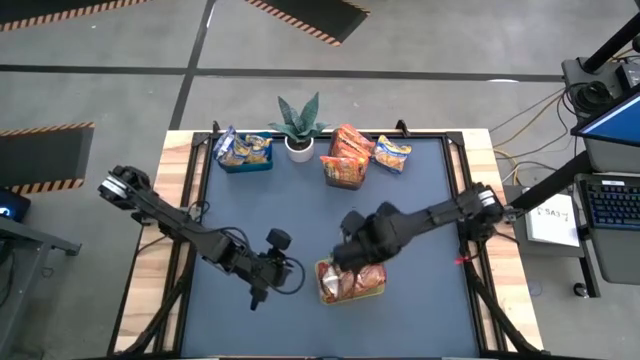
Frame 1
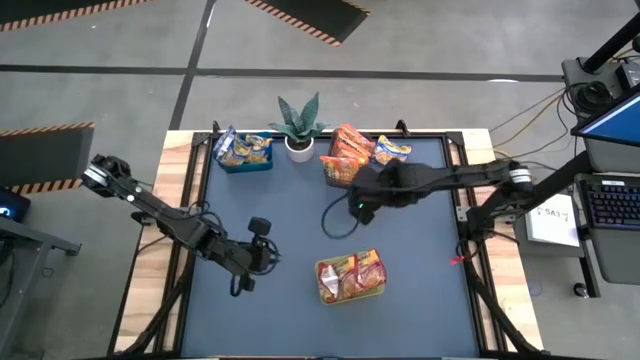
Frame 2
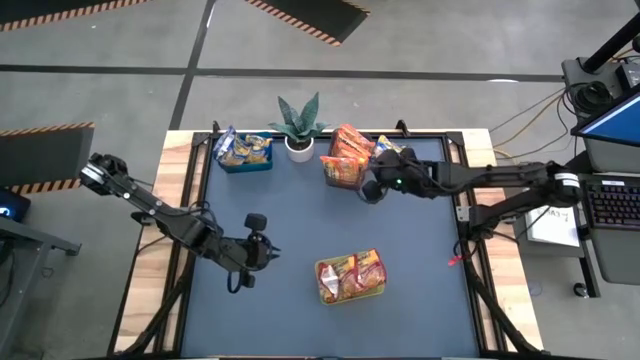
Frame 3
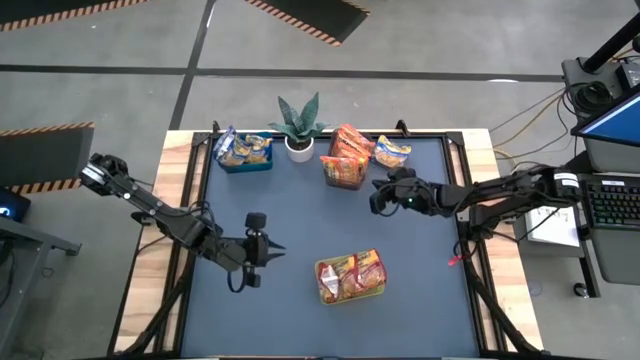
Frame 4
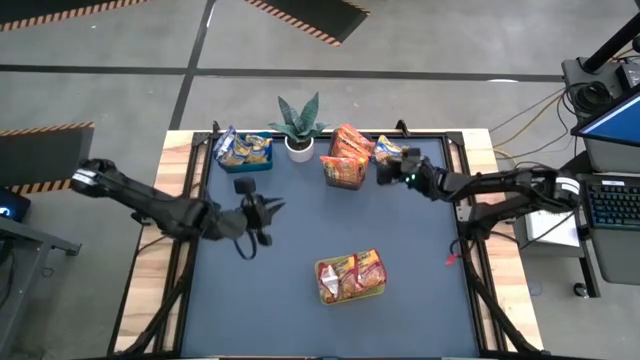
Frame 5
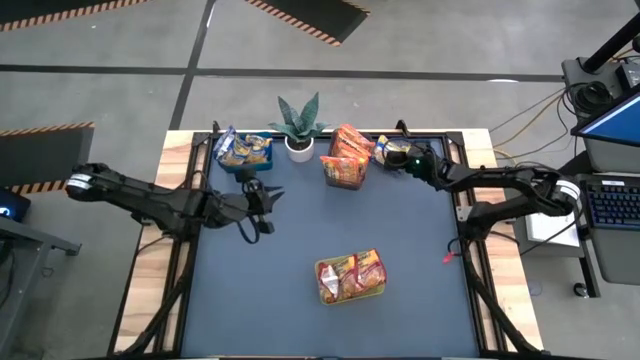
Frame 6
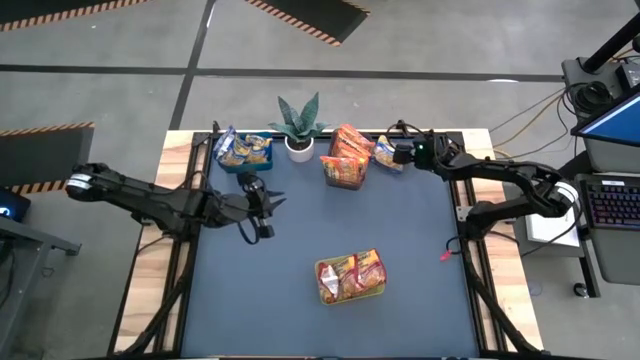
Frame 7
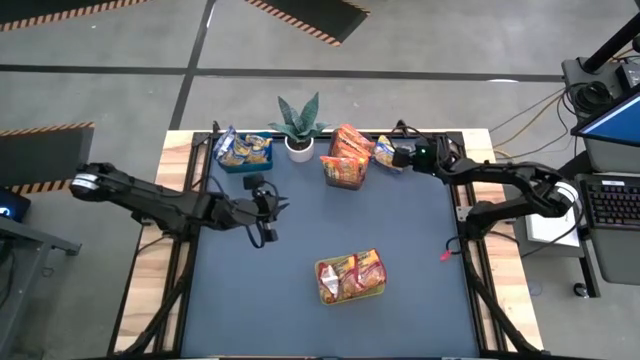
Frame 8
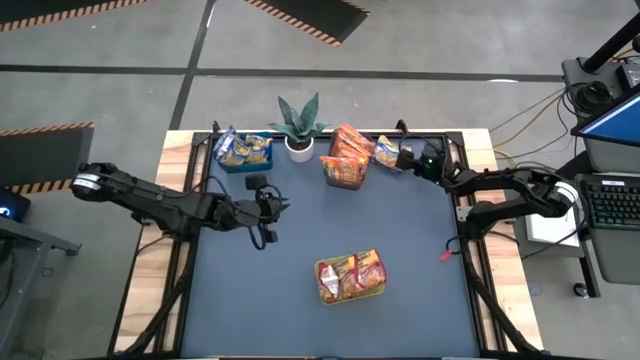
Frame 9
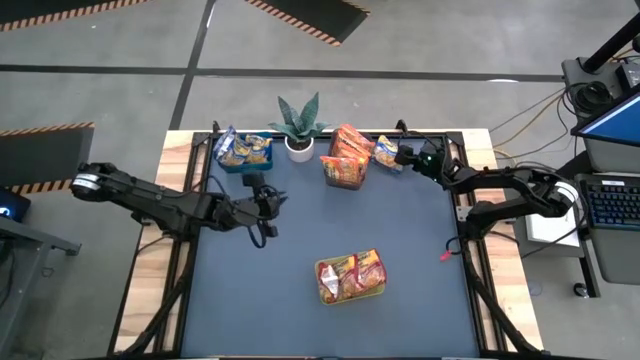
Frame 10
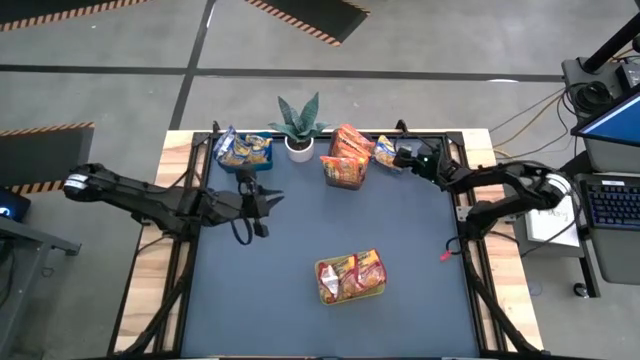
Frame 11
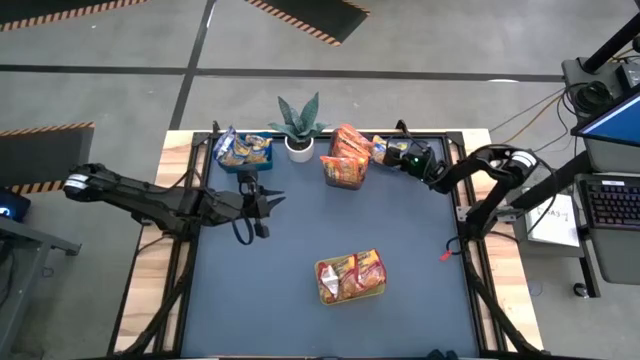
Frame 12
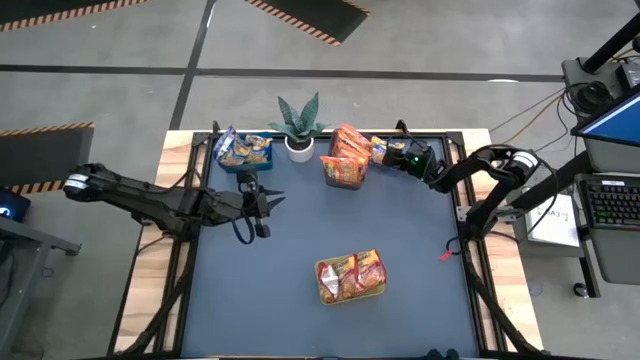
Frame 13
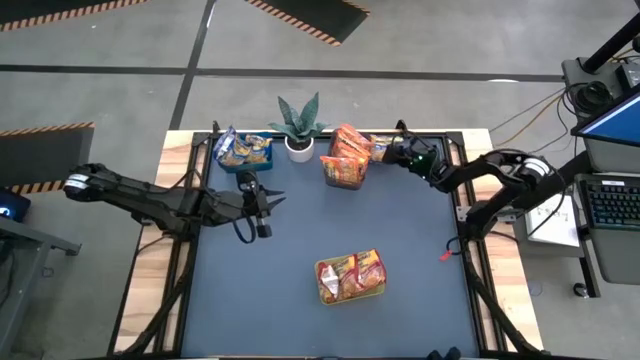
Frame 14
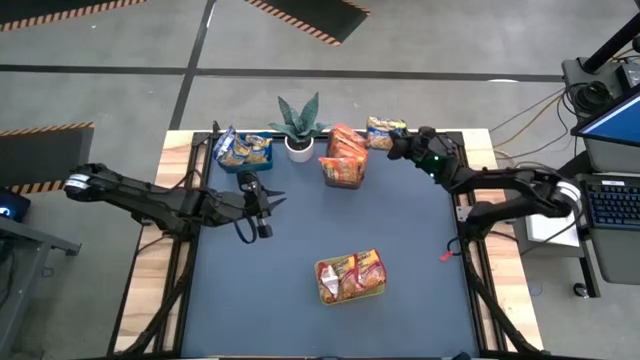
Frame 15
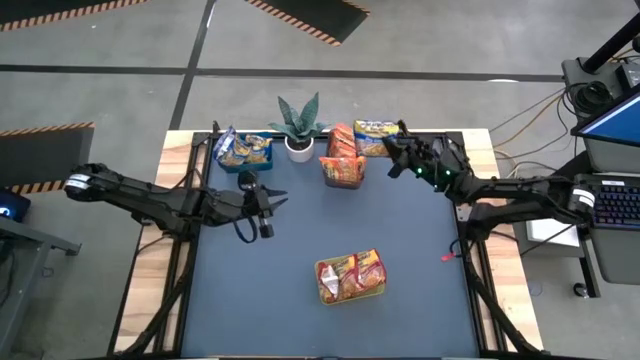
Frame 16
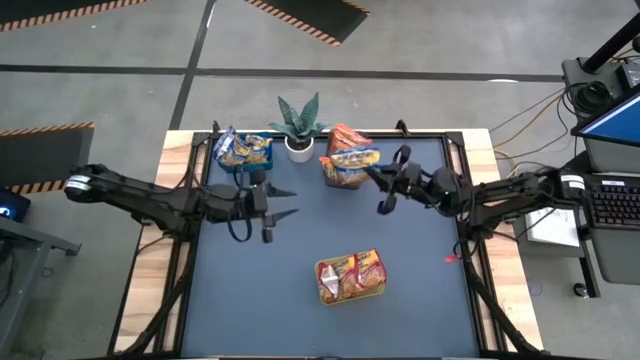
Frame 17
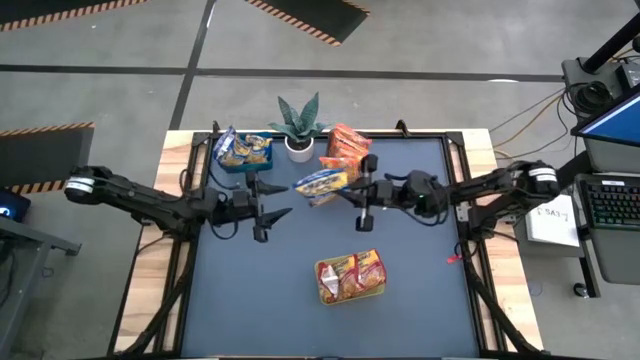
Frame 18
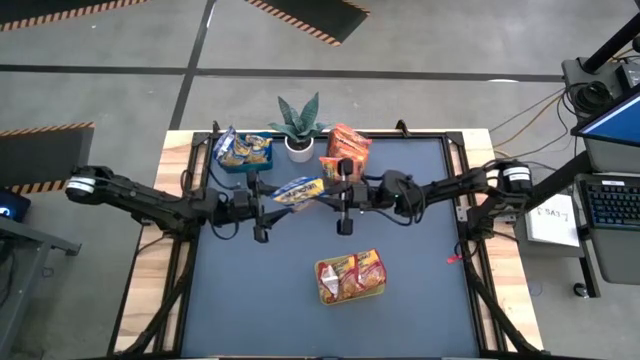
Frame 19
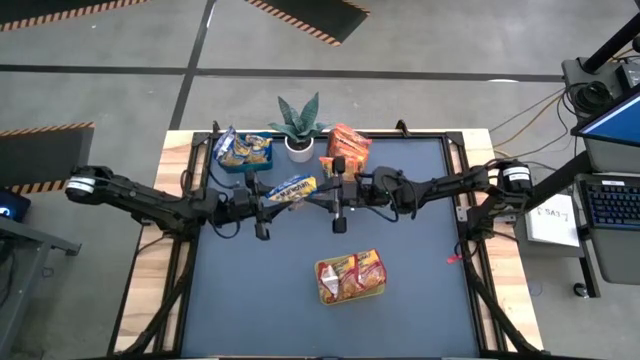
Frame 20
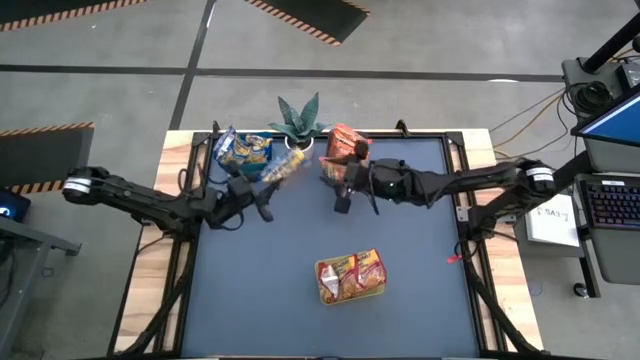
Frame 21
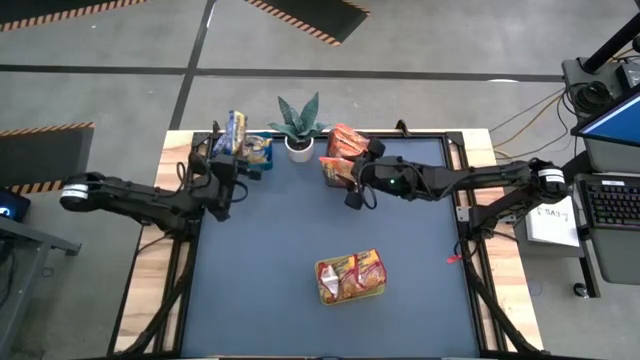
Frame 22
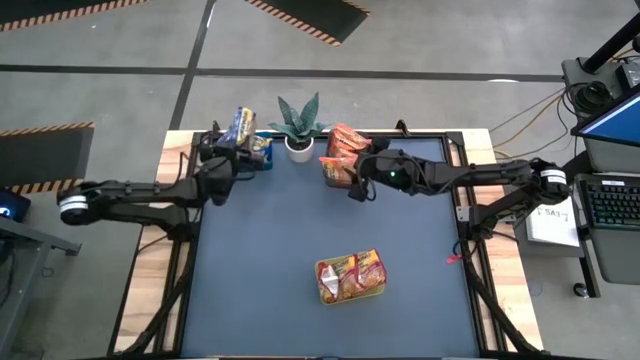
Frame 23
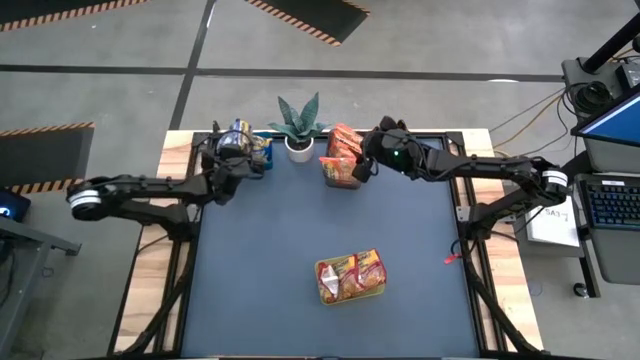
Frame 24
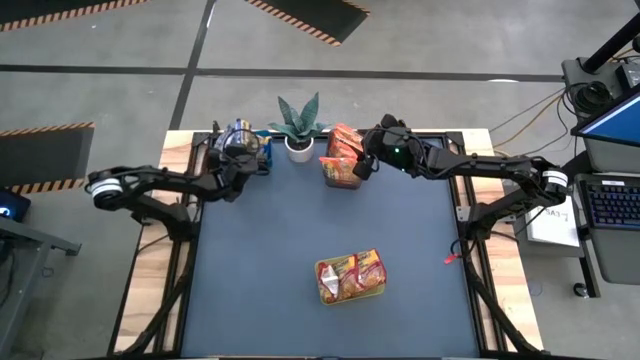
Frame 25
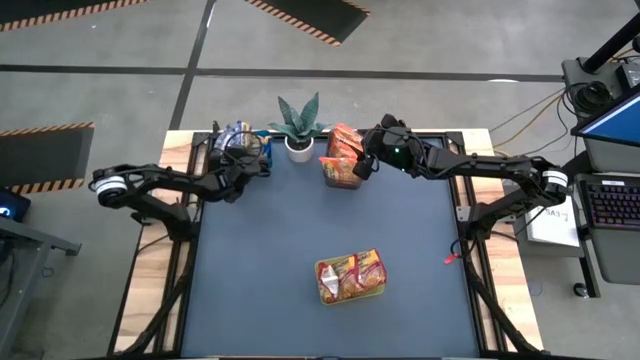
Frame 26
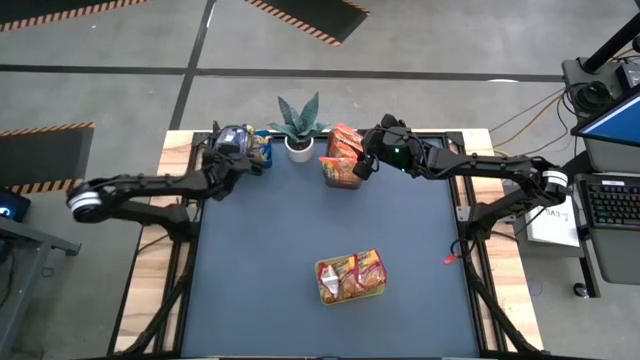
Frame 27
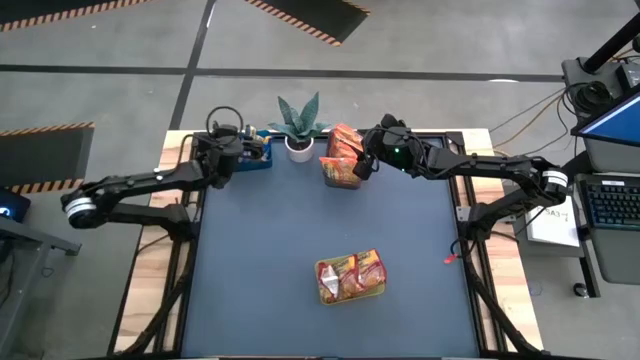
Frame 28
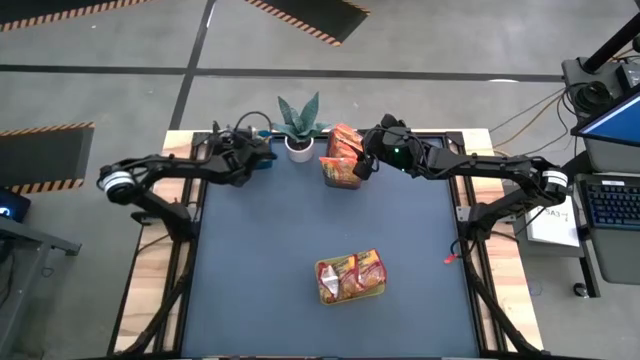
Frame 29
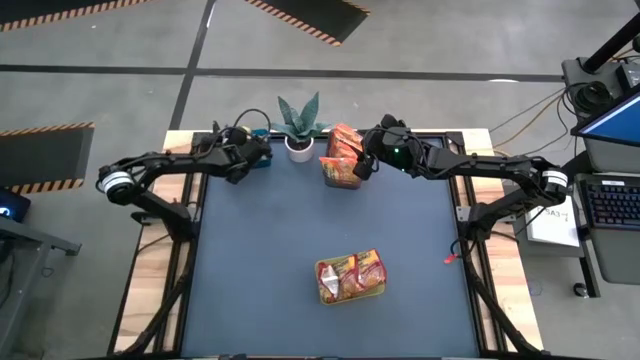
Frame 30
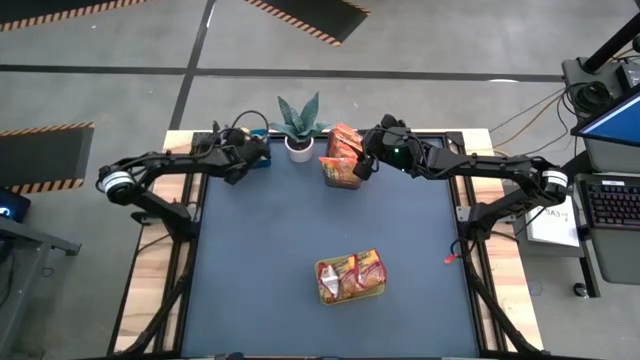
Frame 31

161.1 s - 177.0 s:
Task: Sort Maruchan noodles
Put the blue bag into the blue bin

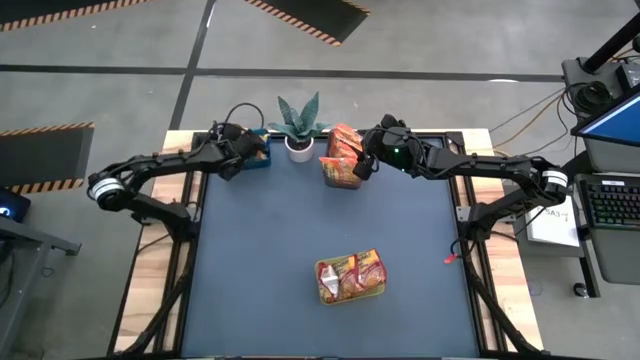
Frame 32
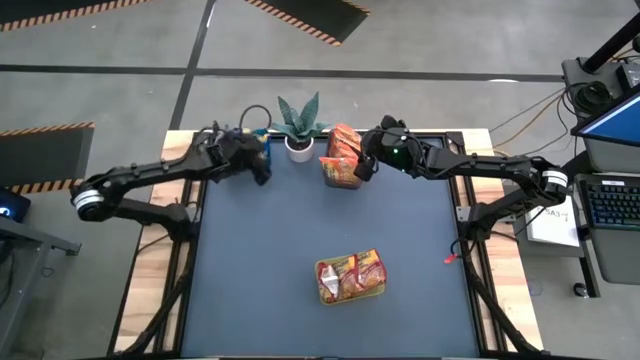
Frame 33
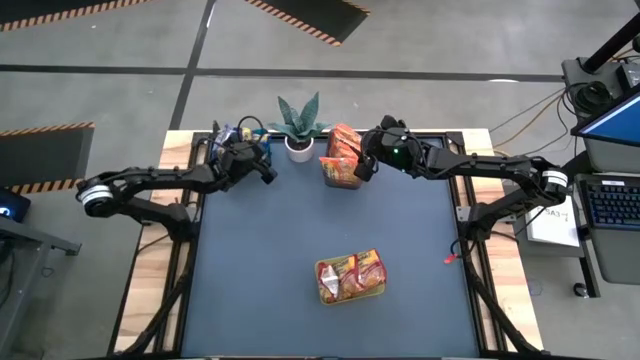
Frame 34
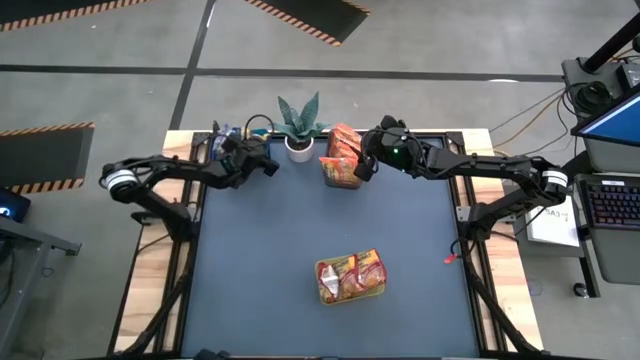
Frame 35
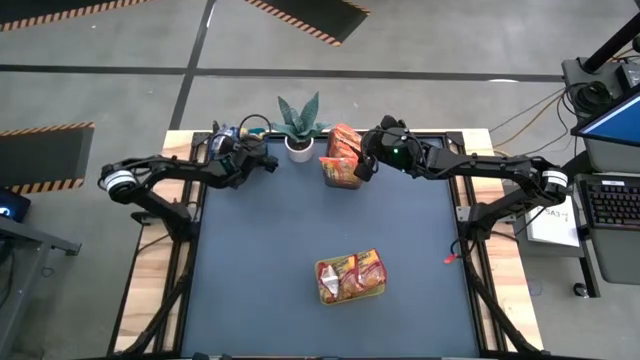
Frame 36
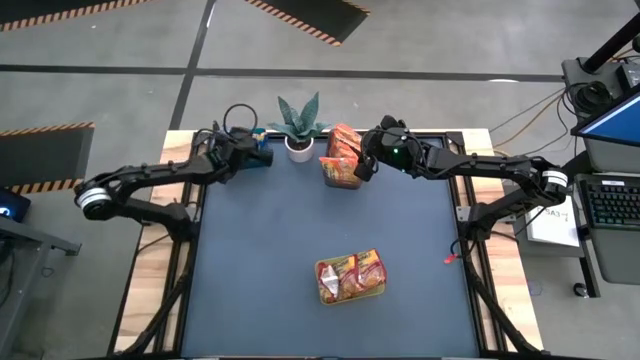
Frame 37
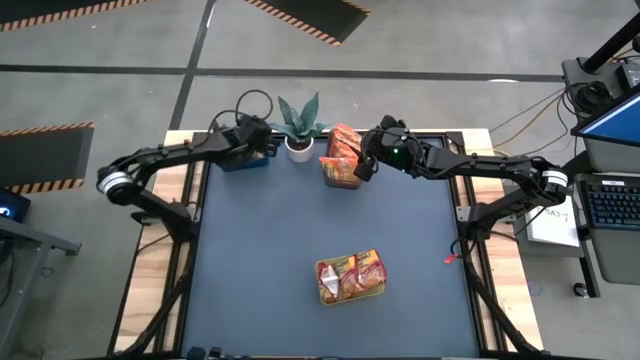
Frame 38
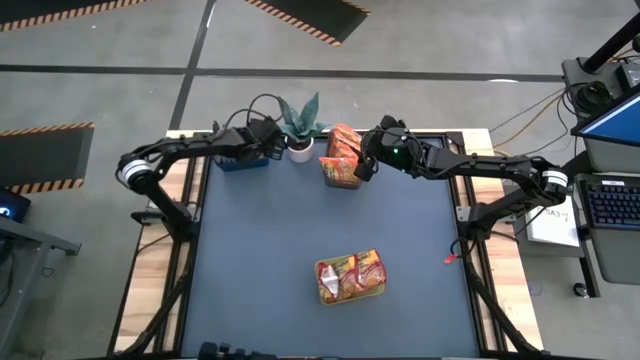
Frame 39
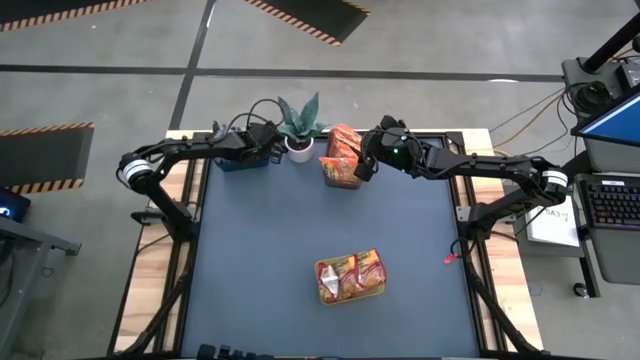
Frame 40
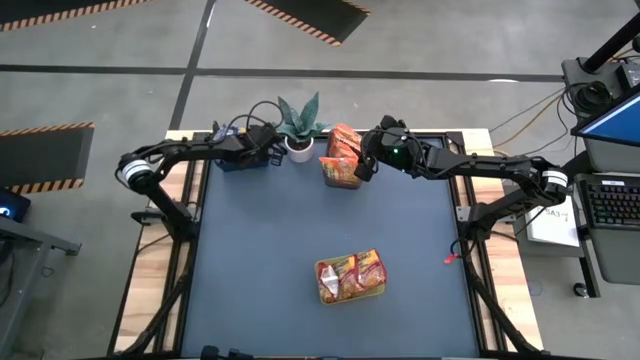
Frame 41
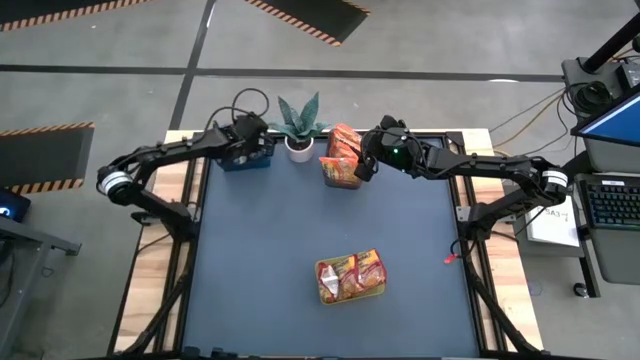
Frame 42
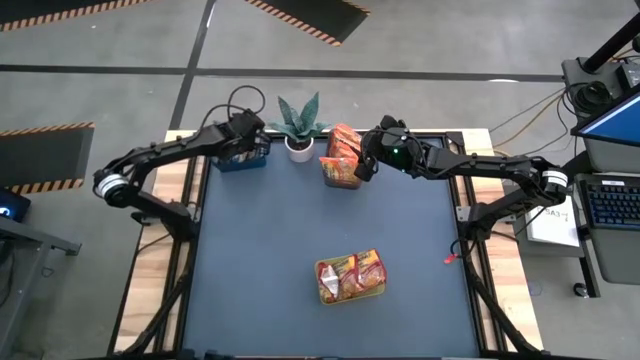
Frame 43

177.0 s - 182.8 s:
Adjust the blue bag
